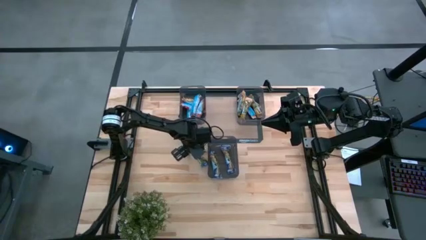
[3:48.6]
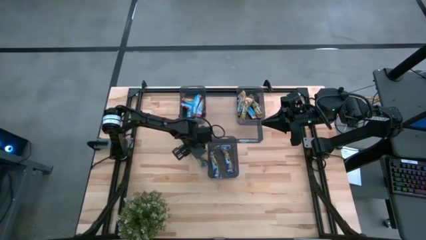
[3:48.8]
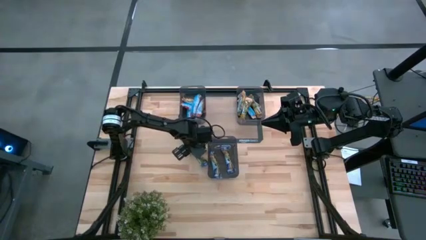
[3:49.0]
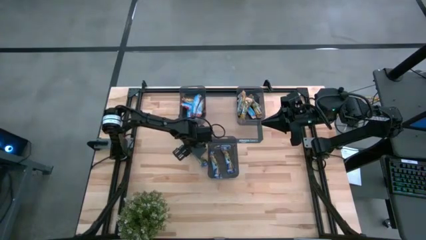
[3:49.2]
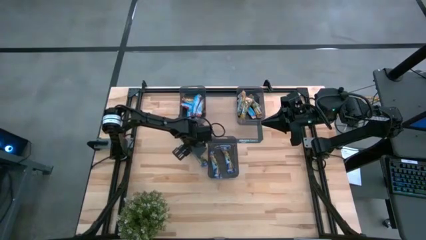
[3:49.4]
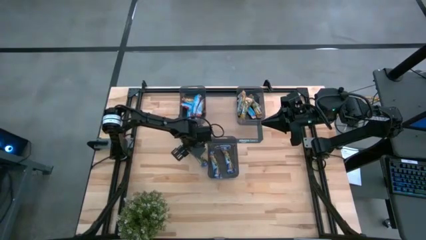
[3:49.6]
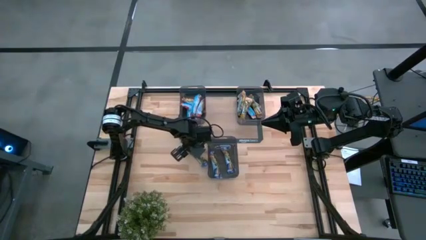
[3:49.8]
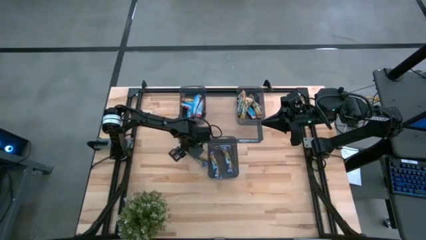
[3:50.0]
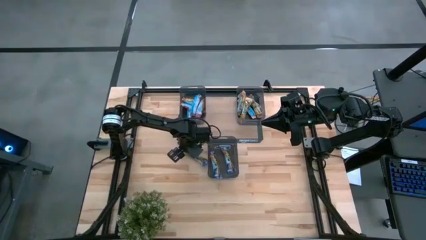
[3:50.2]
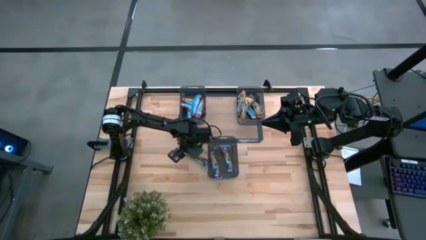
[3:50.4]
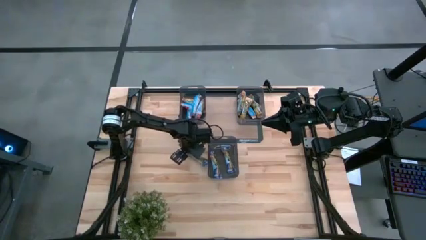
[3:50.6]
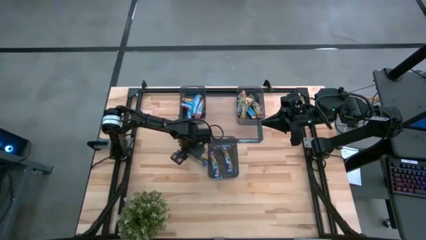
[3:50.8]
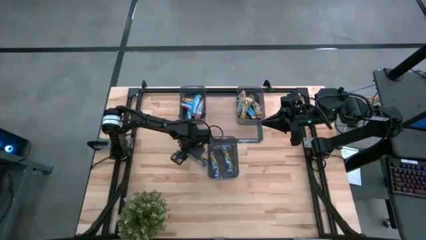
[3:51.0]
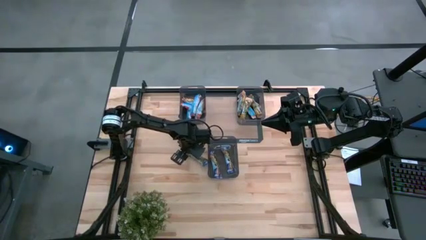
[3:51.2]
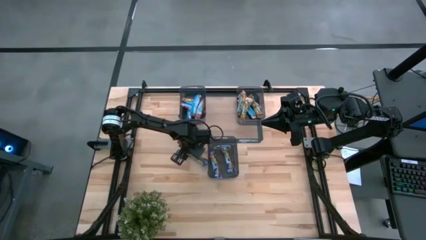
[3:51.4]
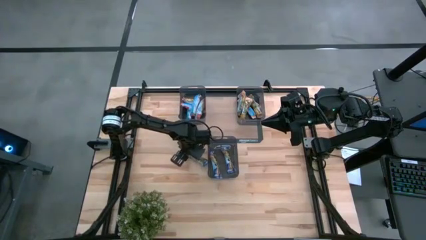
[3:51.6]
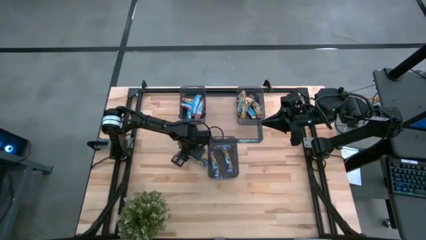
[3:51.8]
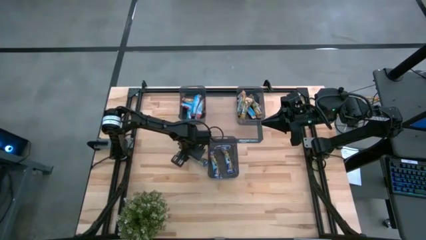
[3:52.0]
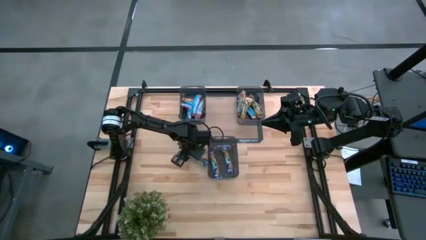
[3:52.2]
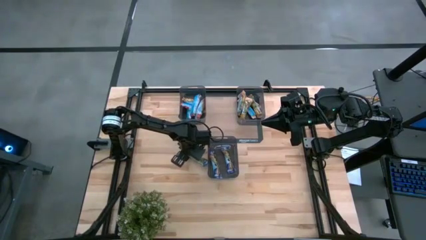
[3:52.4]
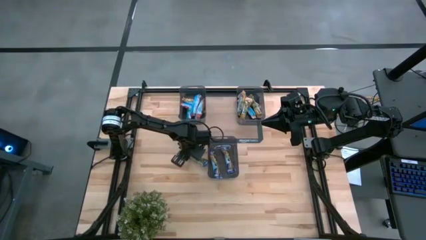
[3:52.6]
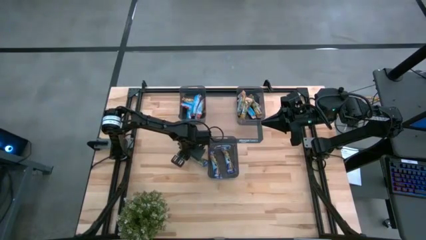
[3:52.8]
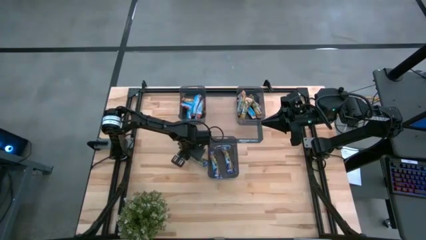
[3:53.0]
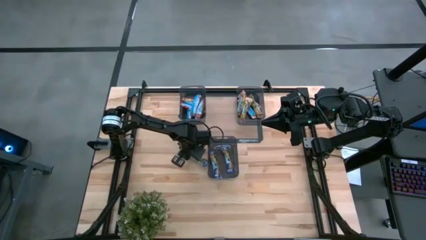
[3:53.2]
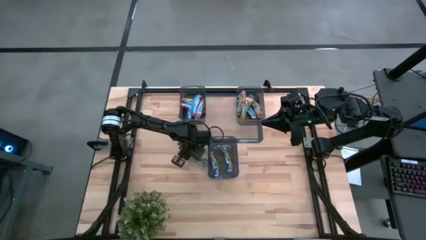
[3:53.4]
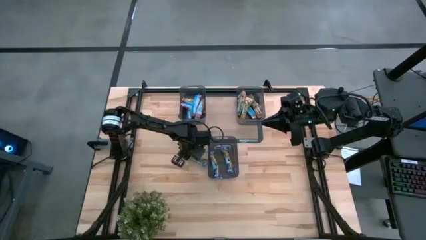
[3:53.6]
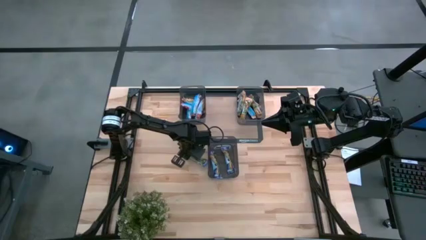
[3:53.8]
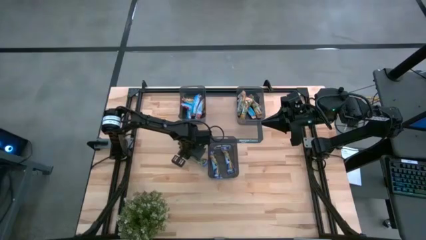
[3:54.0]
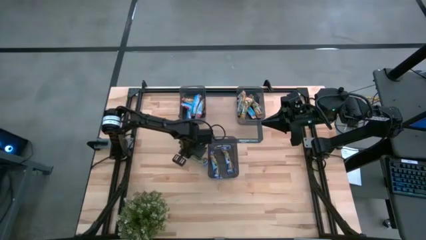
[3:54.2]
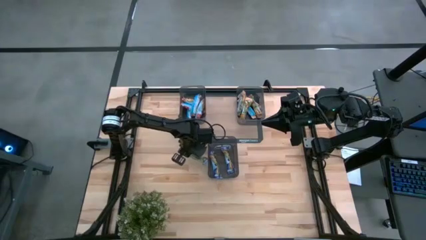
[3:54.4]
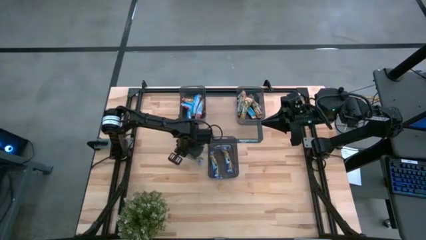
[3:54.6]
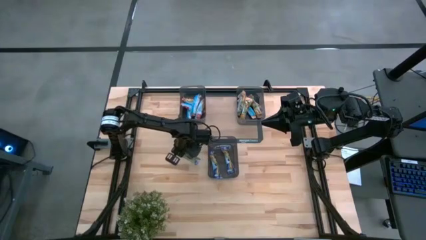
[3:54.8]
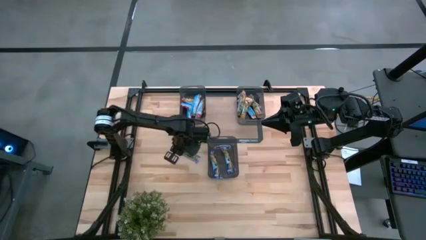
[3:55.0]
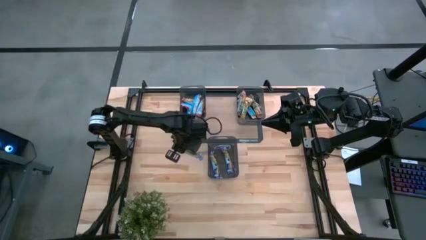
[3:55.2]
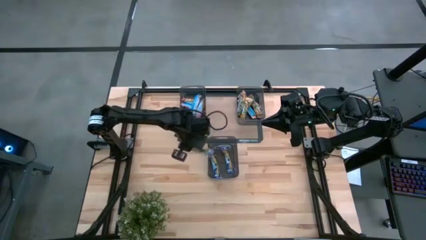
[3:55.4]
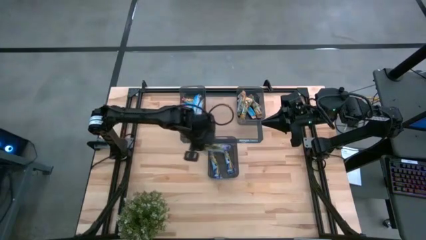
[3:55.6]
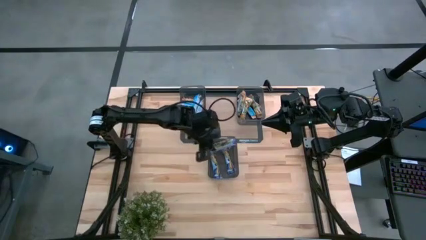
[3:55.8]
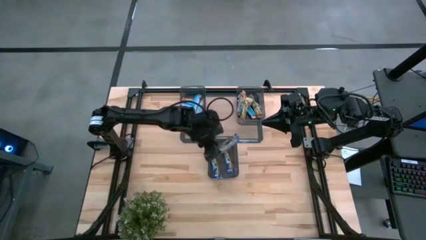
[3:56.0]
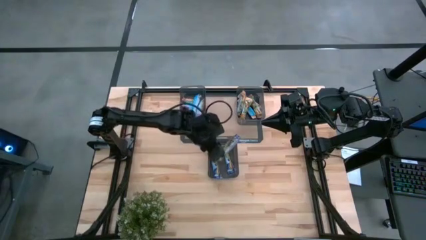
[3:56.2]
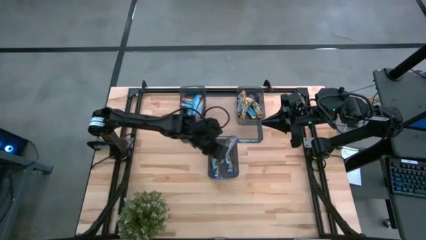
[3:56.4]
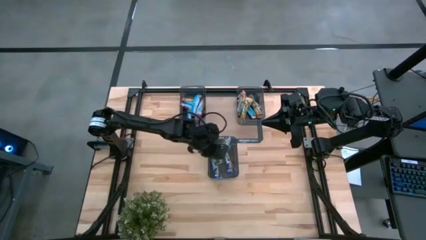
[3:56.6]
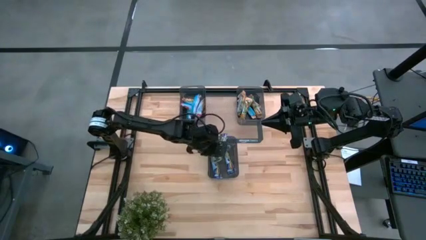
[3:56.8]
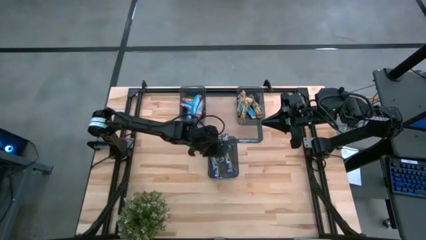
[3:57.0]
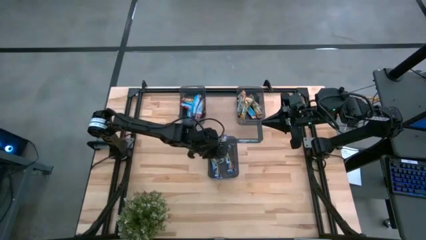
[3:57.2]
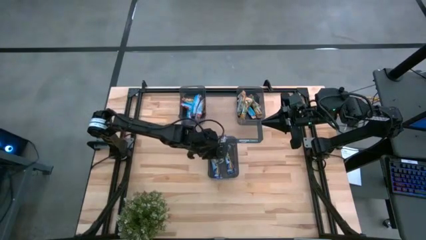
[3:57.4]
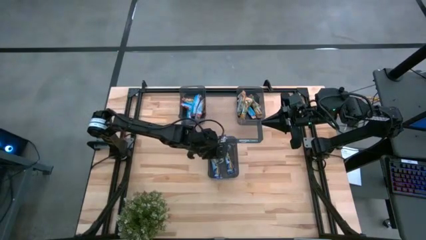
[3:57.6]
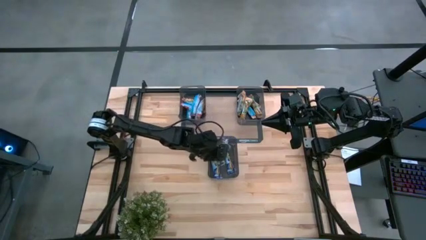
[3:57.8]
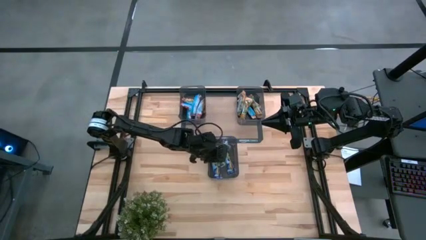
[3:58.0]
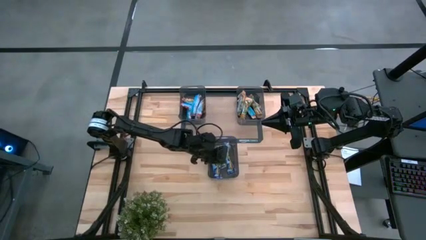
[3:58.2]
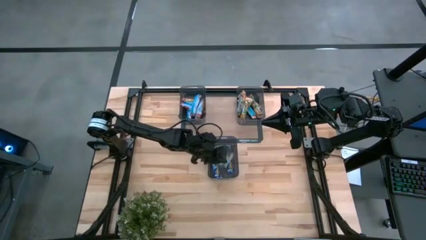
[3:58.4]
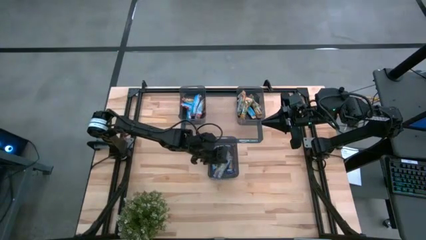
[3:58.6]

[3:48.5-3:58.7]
Task: Pick and place Granola Bars by type
Put the blue granola bar into the bottom black bin

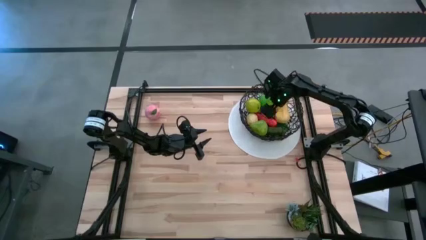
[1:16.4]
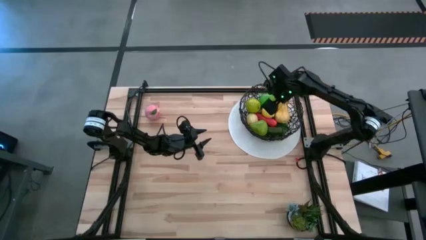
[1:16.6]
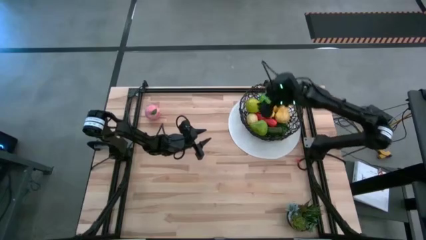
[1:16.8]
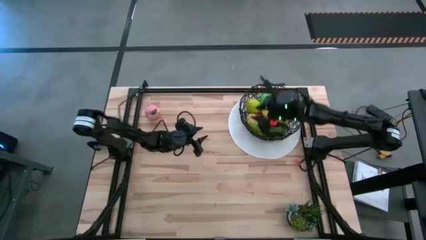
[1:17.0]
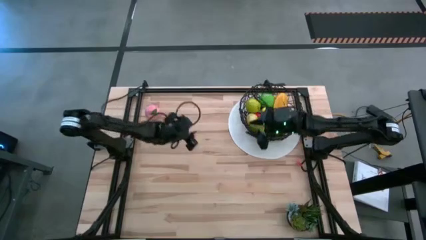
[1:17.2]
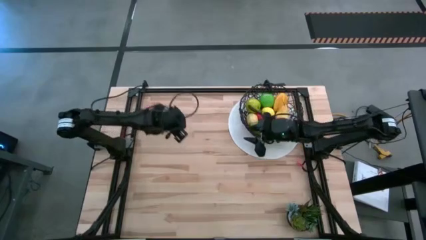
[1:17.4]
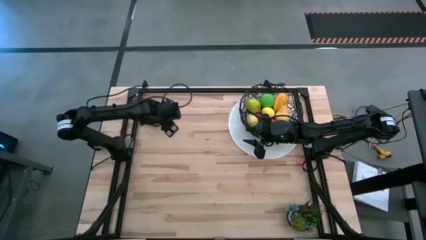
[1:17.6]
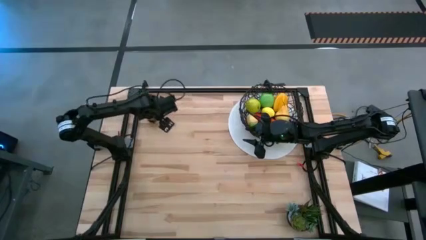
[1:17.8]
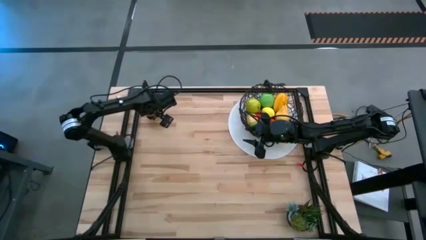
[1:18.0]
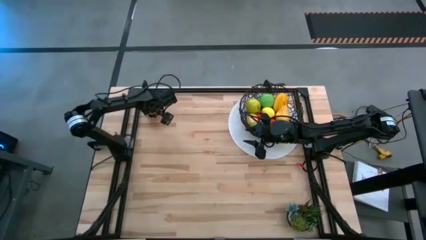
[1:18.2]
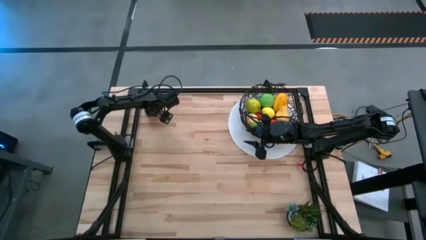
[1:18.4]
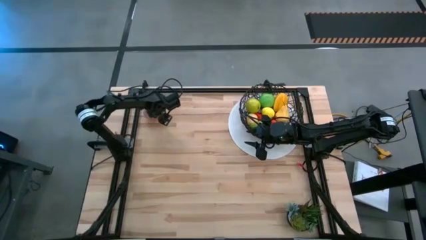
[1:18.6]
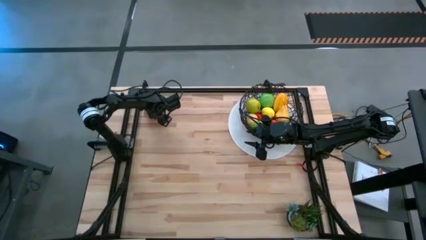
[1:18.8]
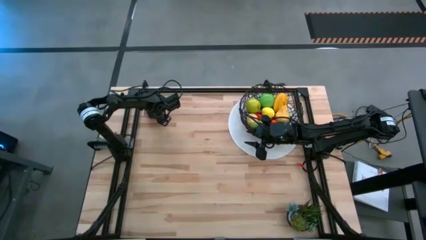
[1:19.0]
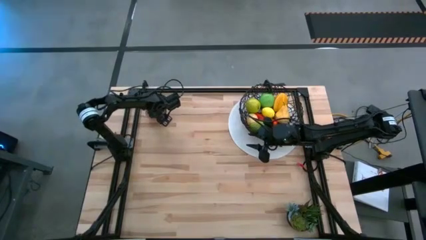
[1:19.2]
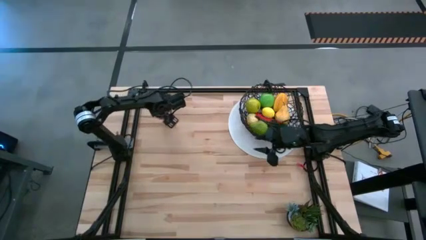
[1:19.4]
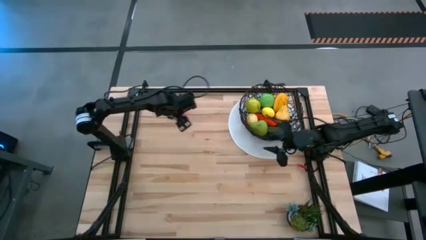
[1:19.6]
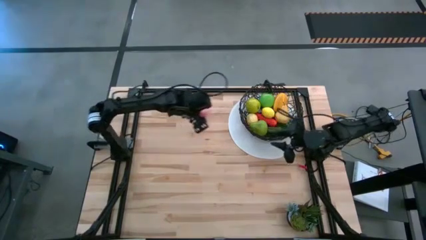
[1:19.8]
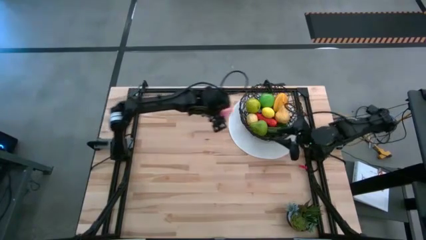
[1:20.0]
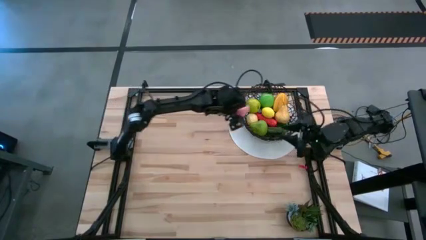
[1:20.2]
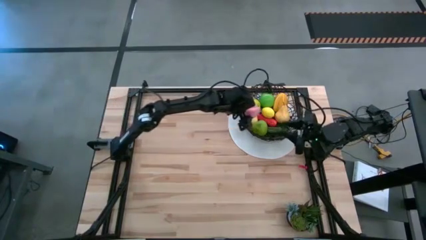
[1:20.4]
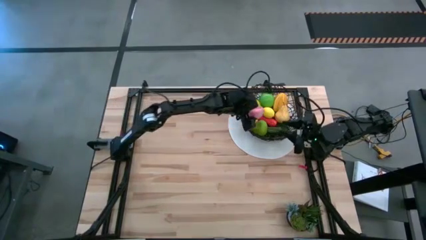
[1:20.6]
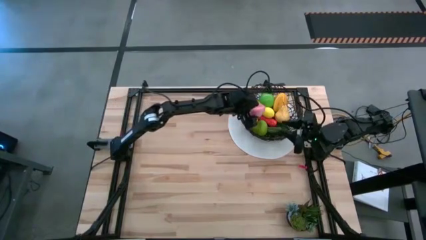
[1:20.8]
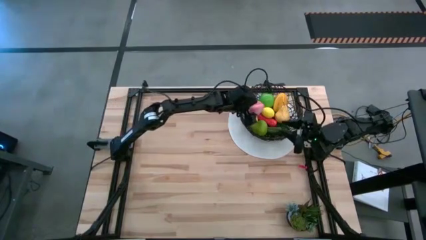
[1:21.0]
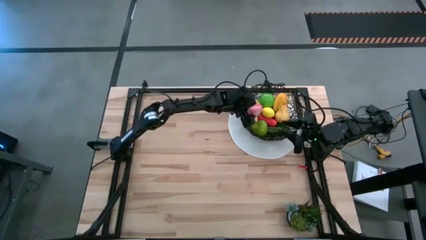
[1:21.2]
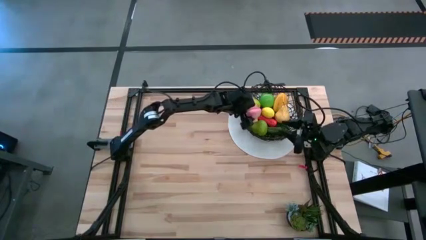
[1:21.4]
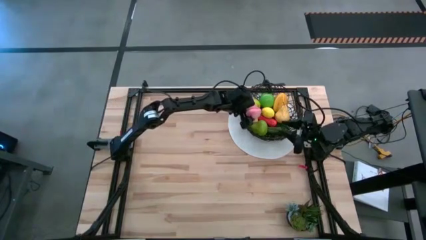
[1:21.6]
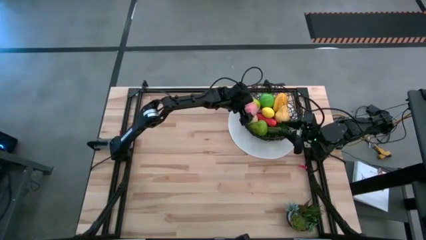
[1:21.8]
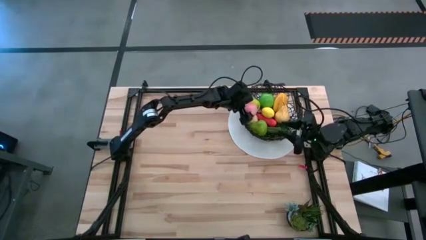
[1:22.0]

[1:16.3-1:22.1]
Task: Build produce basket
Put the pink peach into the black wire basket
